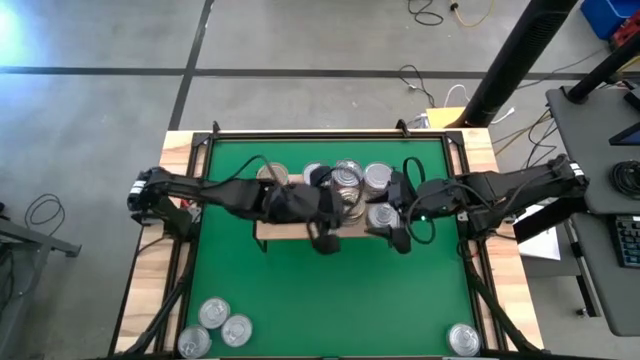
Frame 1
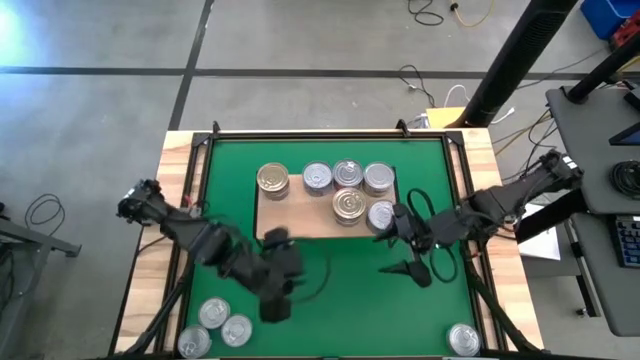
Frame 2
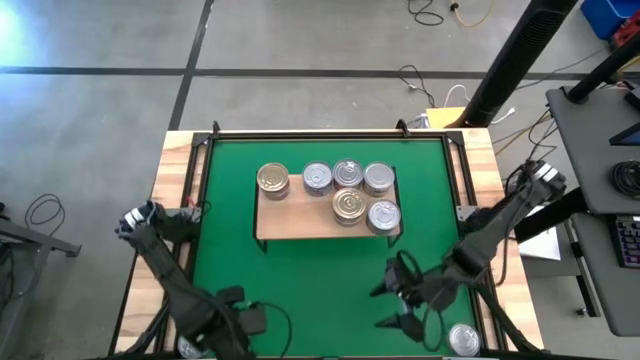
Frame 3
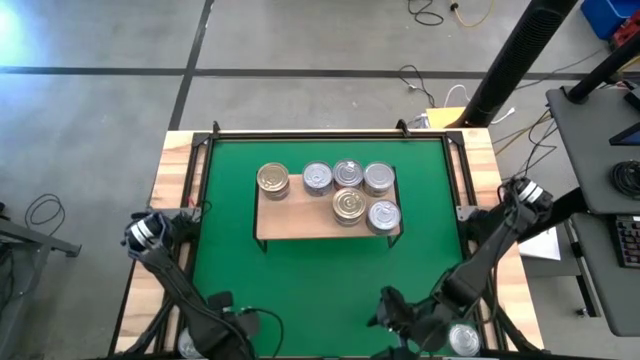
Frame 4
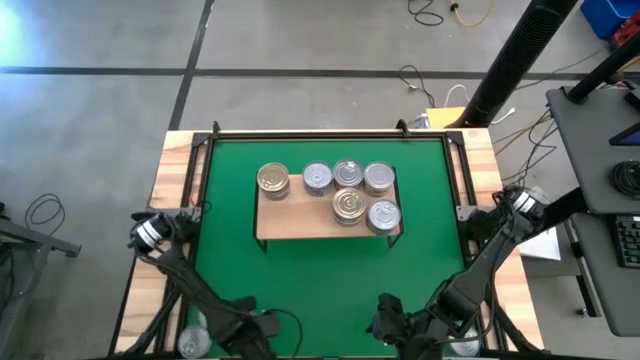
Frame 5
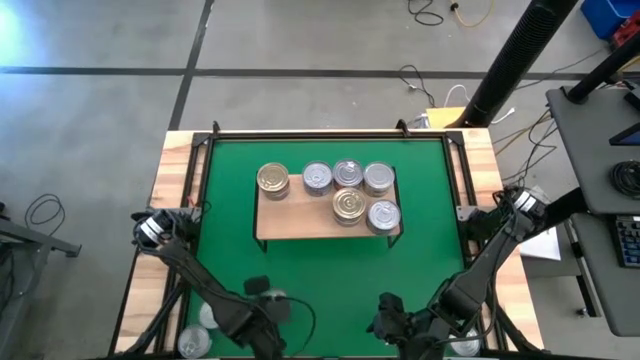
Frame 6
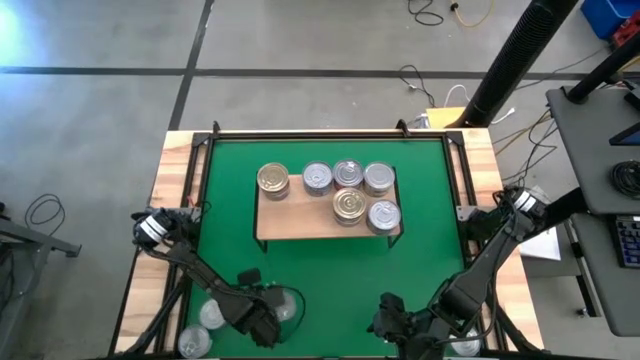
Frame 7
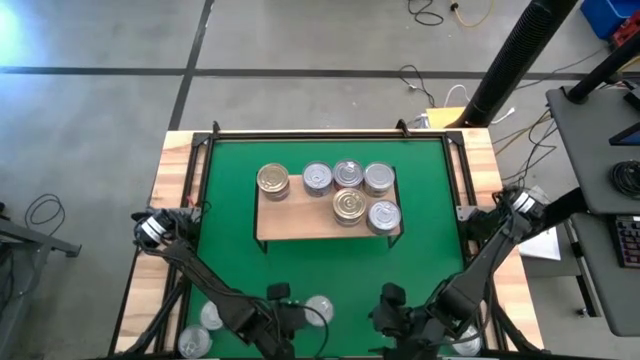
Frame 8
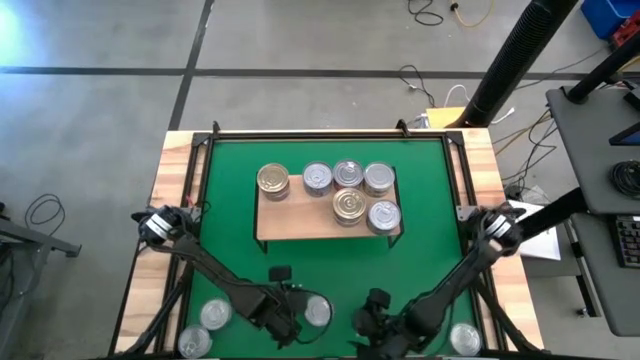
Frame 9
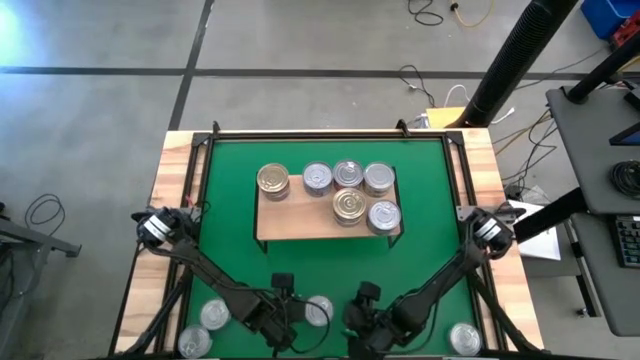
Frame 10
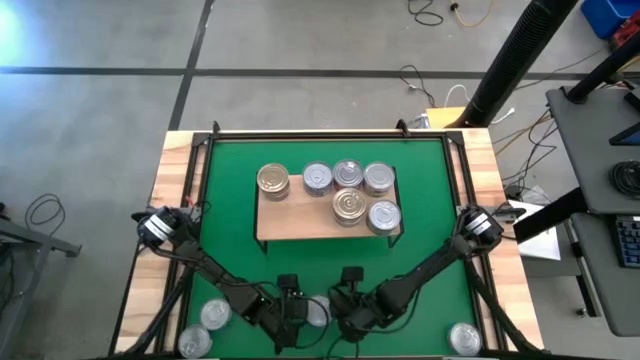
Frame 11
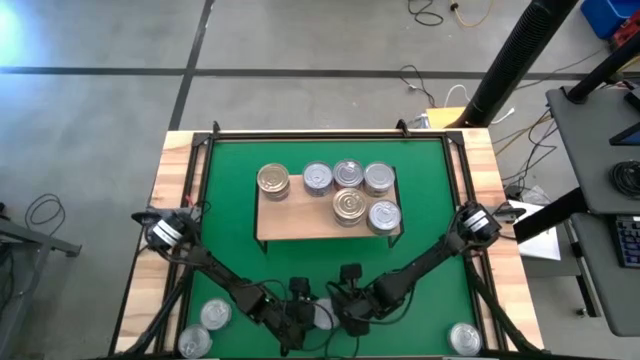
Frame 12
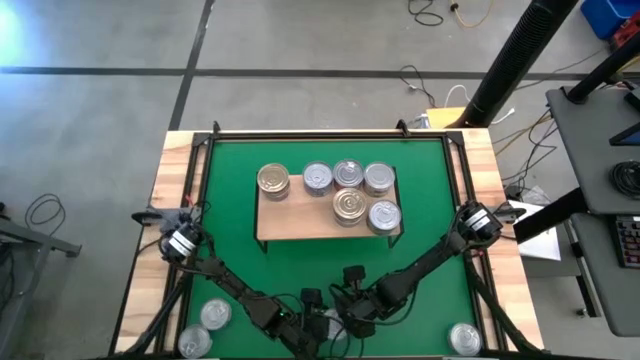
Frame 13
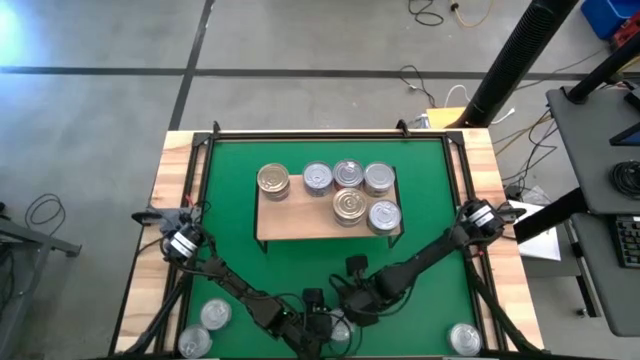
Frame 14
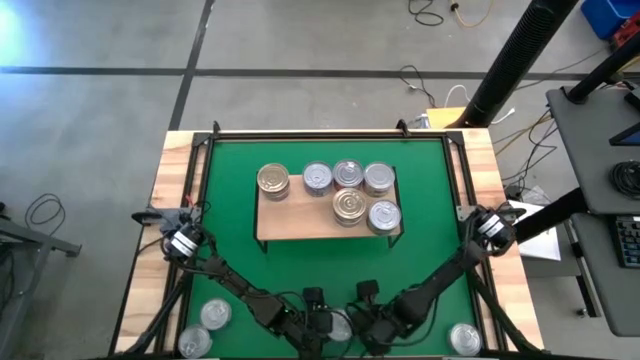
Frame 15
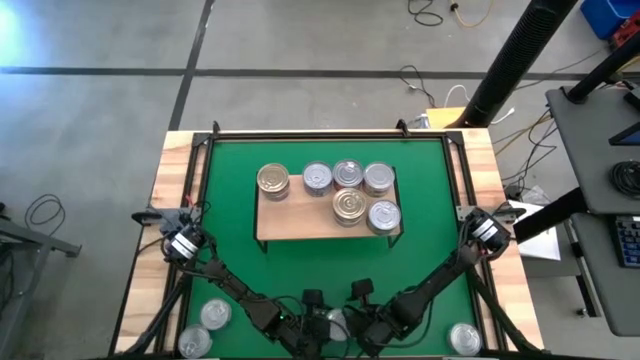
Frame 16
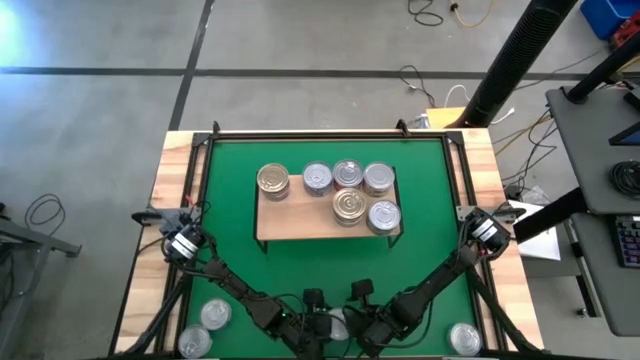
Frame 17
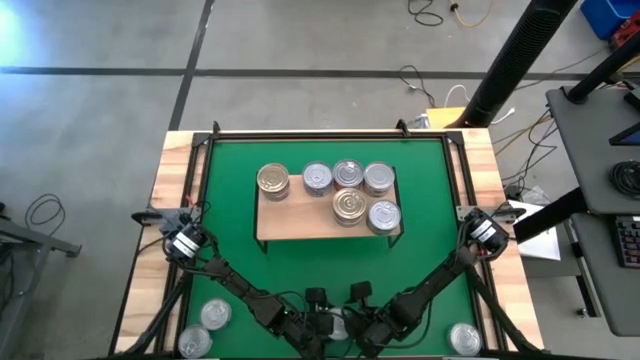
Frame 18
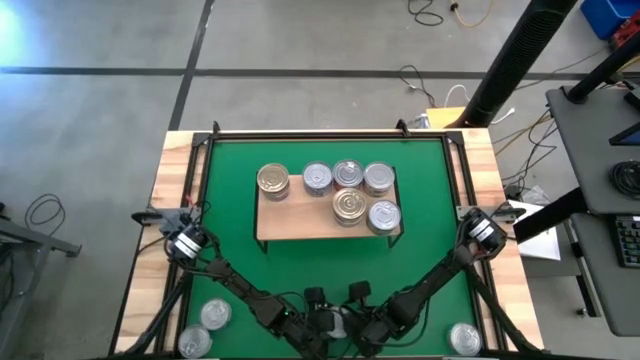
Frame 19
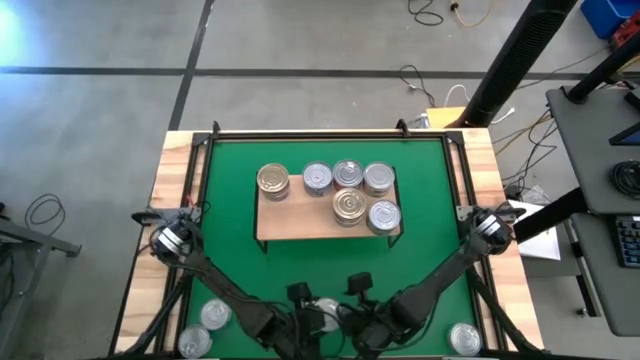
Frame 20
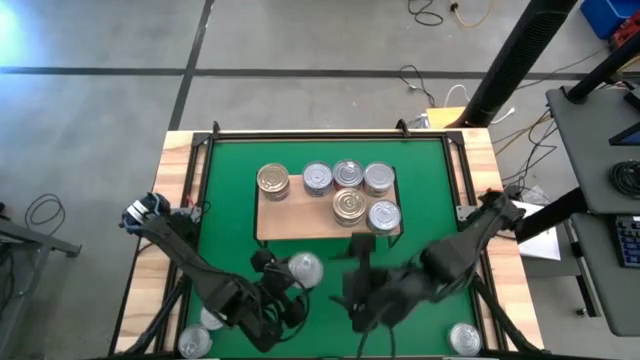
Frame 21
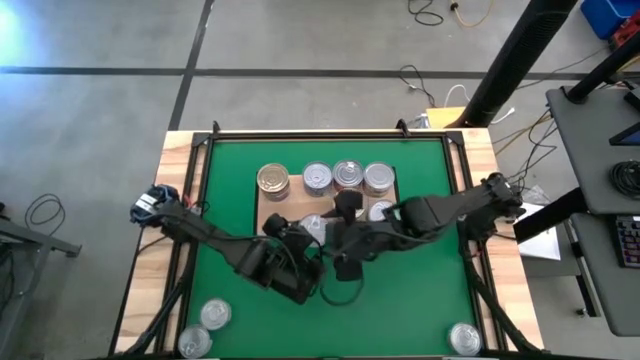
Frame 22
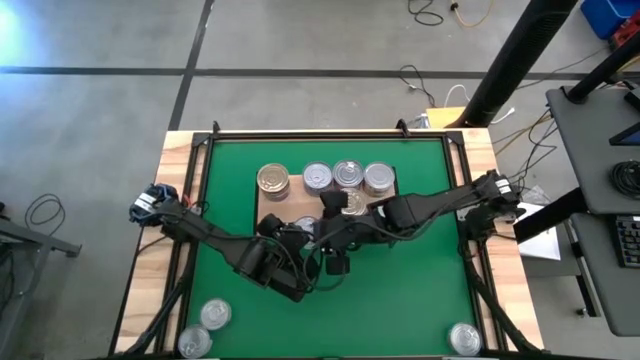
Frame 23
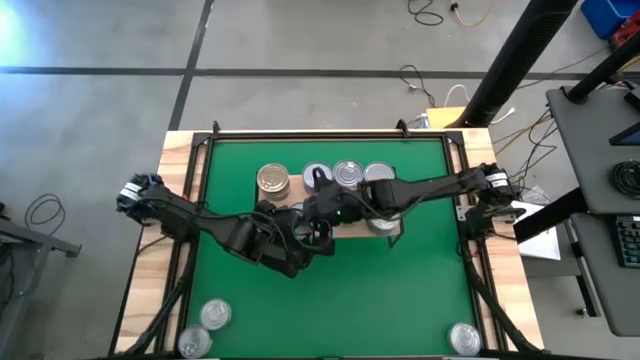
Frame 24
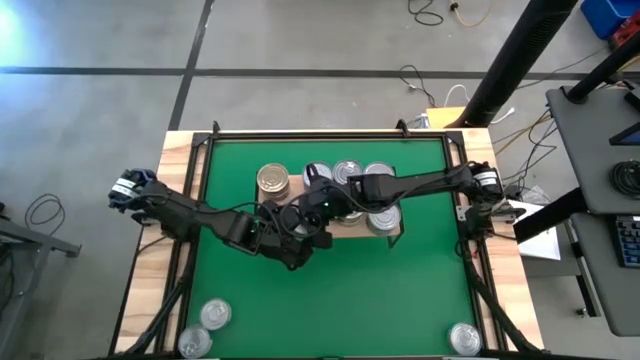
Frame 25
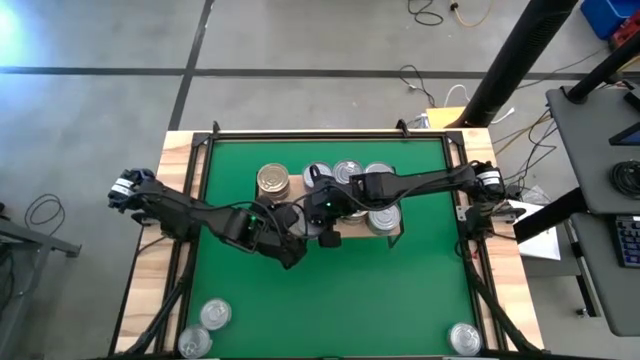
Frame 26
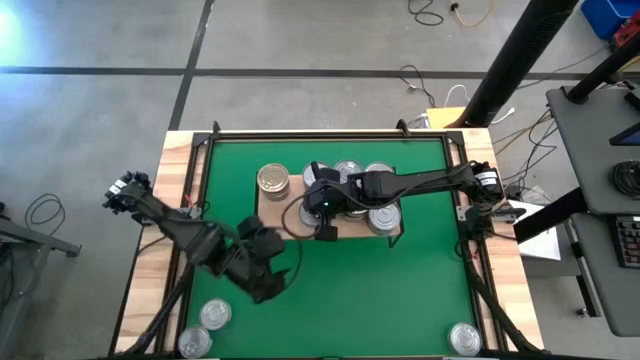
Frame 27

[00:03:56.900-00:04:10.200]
Task: Stack canned seafood by type on shelf
Put the top left green and blue tuna can on the shelf

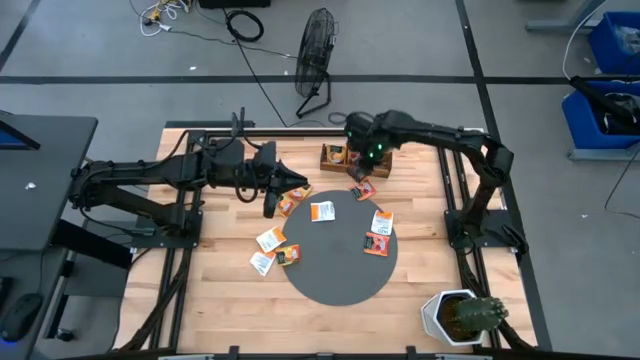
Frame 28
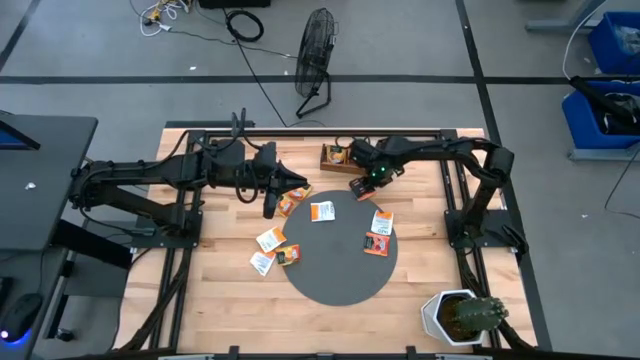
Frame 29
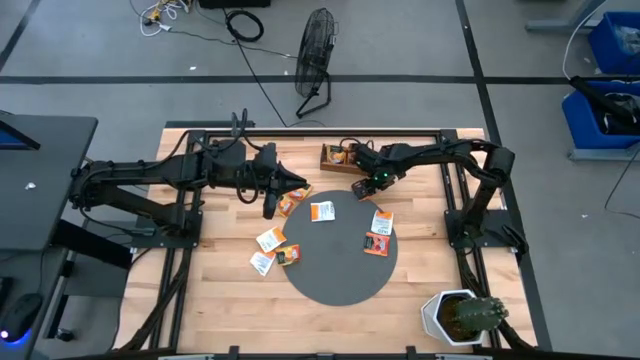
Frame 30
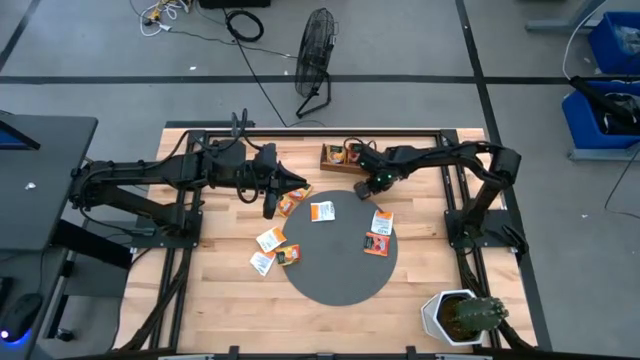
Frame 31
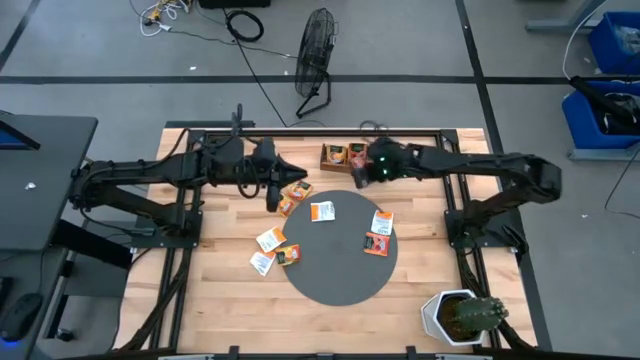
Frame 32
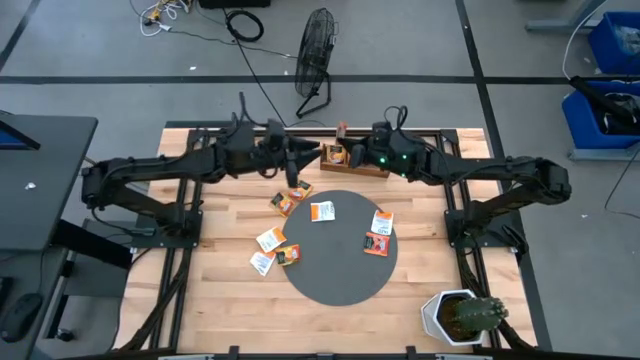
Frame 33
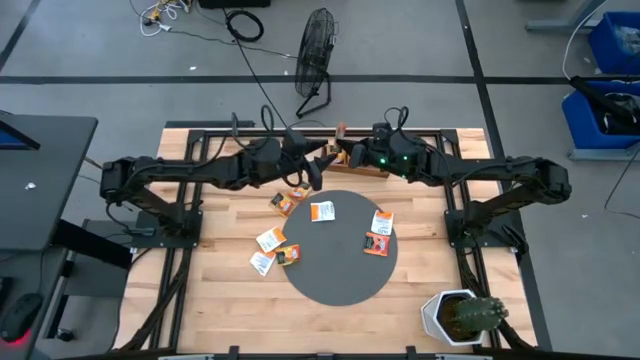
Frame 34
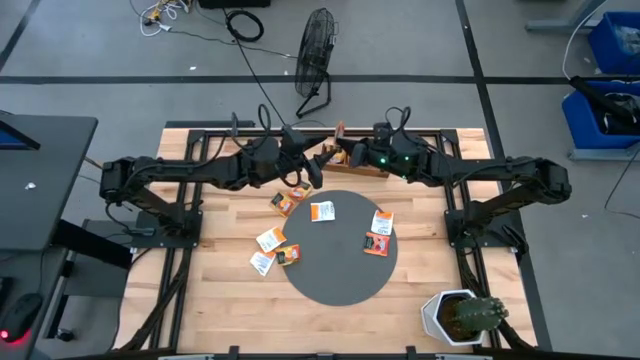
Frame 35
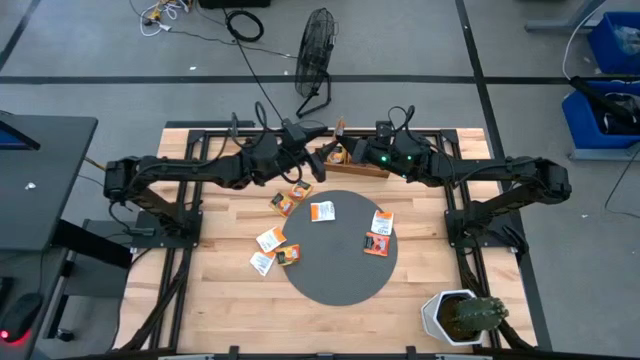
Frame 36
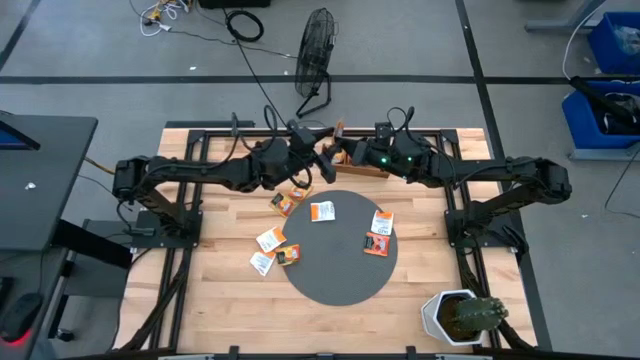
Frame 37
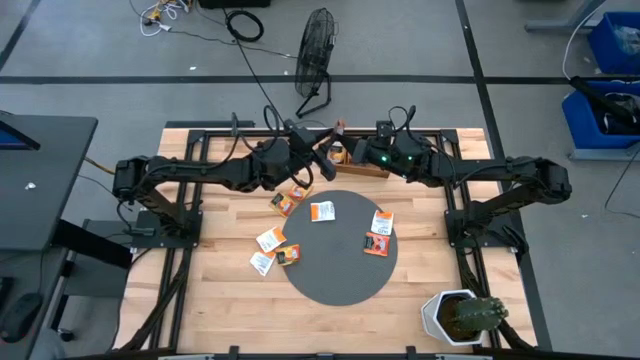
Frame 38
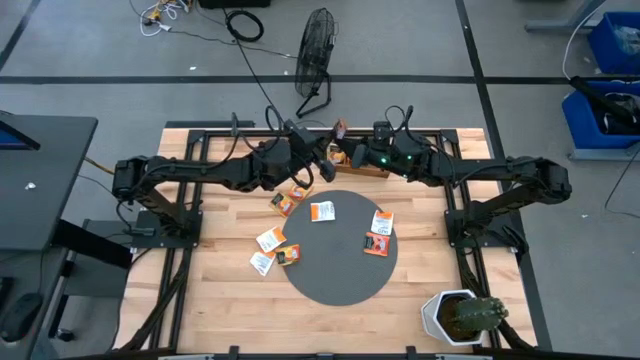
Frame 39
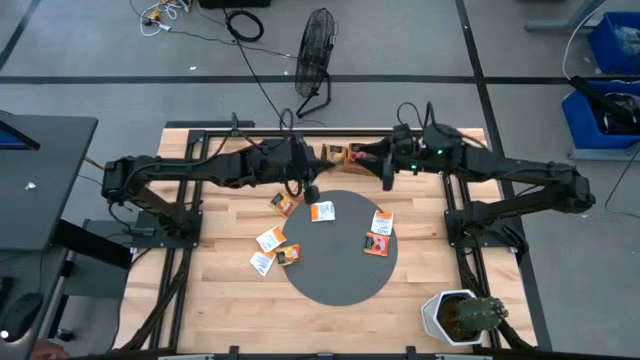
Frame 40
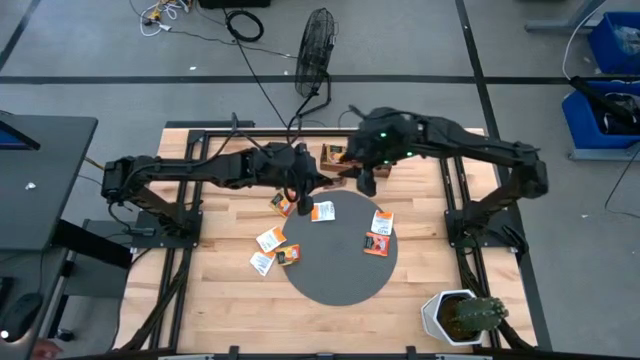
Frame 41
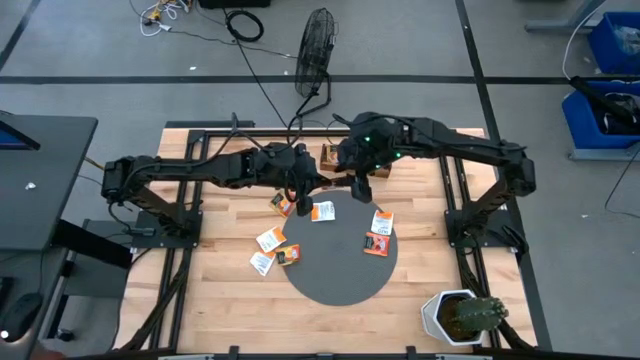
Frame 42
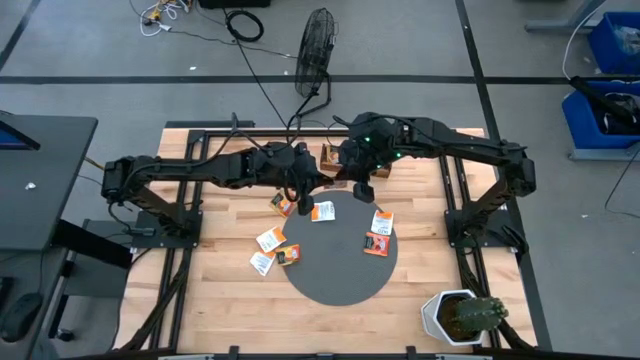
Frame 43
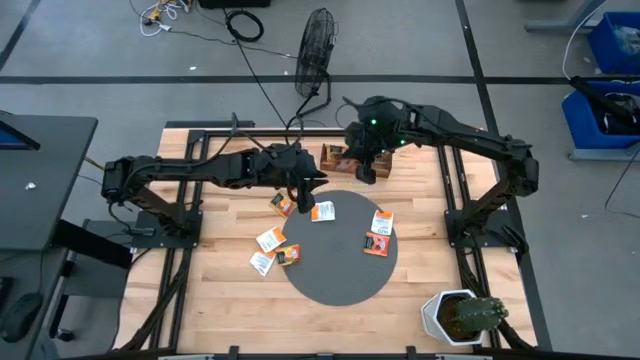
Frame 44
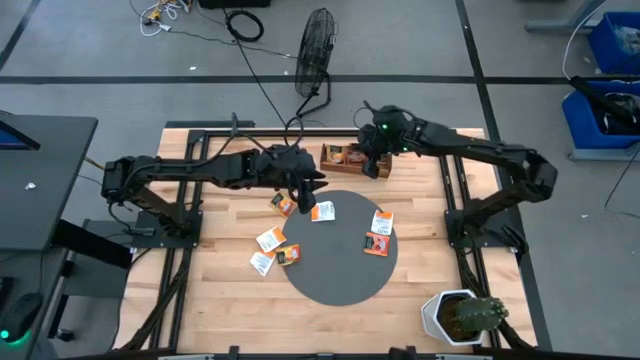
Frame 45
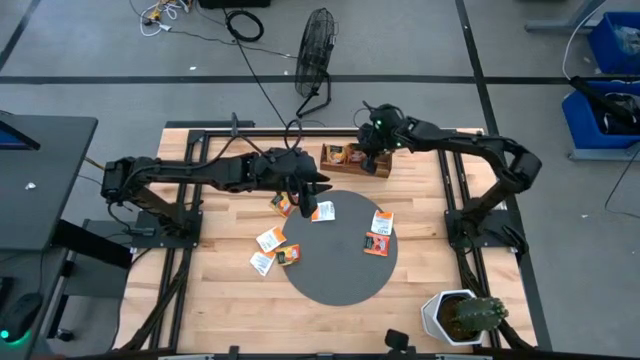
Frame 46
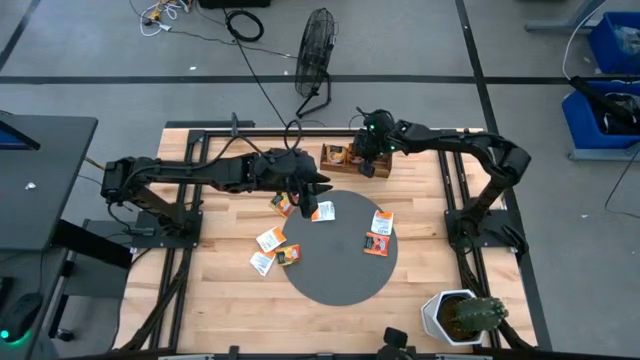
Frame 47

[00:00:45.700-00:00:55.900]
Task: Pick & Place Tea
Put the orange tea bag into the middle section of the wooden organizer
